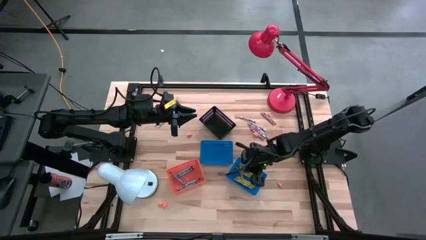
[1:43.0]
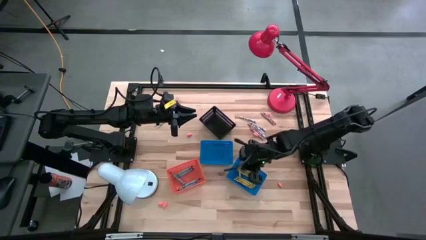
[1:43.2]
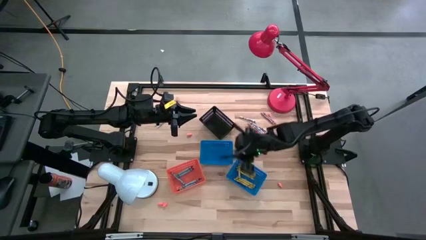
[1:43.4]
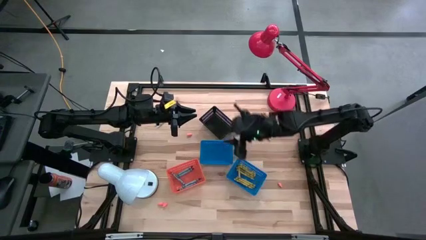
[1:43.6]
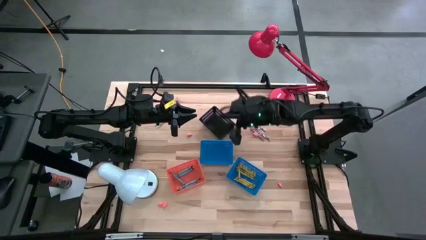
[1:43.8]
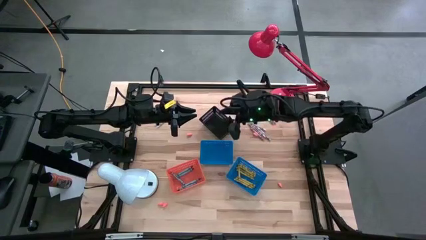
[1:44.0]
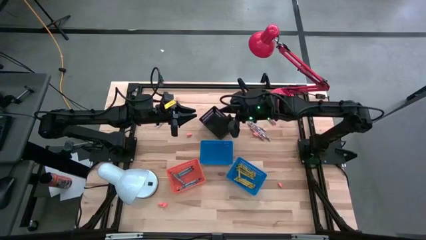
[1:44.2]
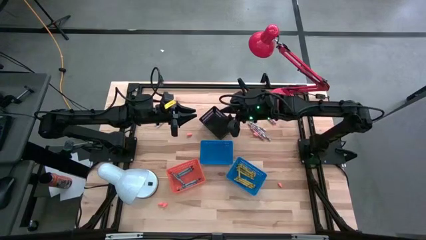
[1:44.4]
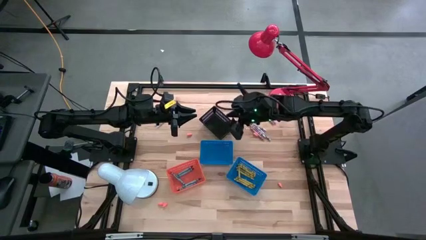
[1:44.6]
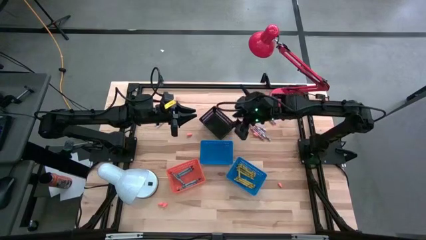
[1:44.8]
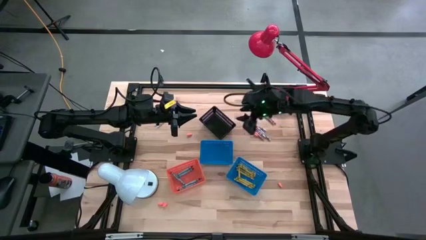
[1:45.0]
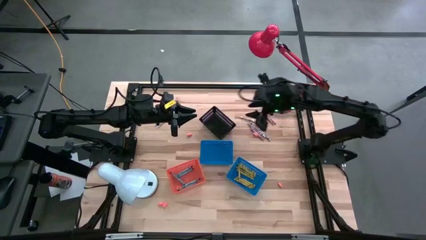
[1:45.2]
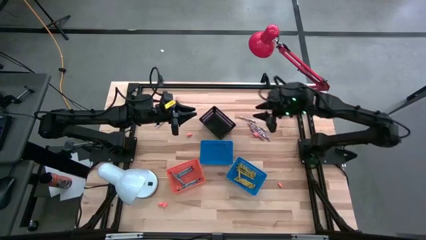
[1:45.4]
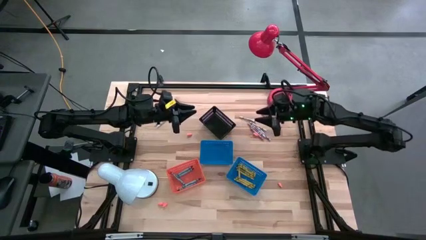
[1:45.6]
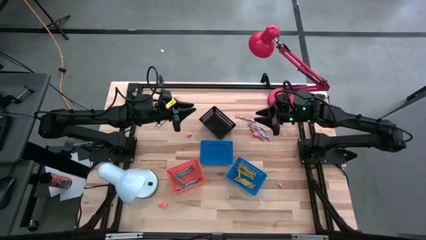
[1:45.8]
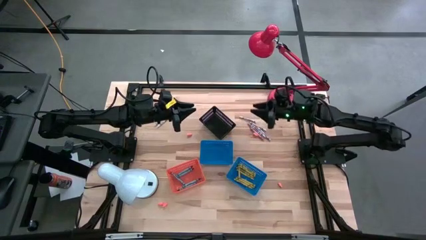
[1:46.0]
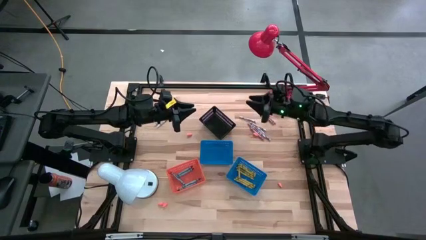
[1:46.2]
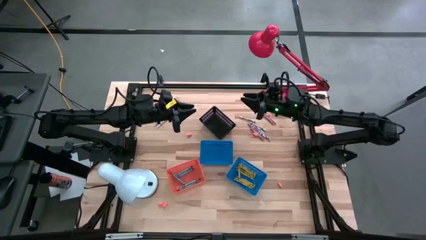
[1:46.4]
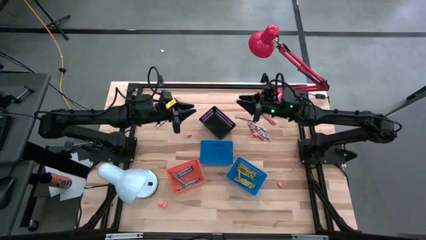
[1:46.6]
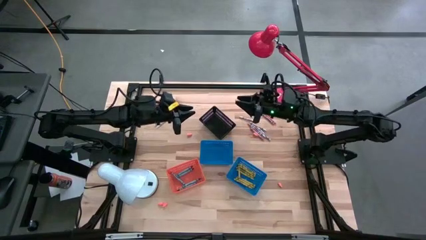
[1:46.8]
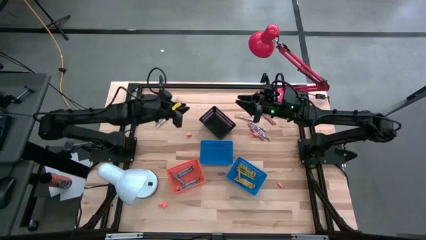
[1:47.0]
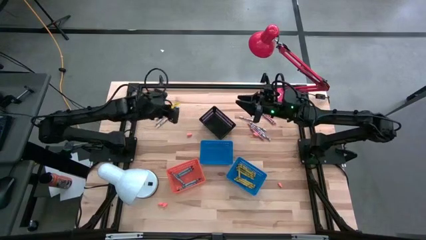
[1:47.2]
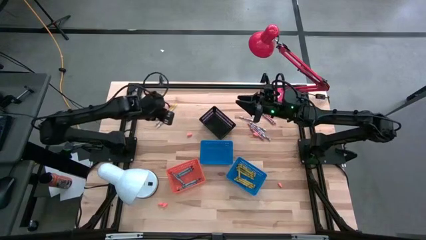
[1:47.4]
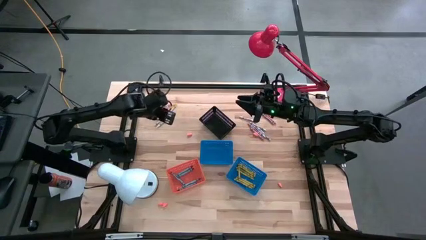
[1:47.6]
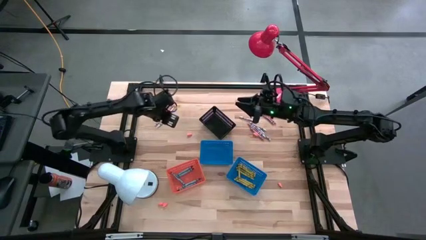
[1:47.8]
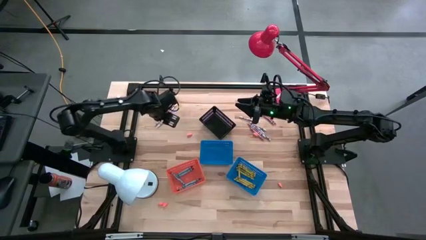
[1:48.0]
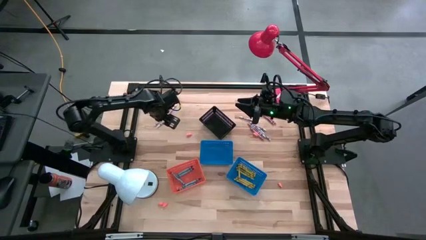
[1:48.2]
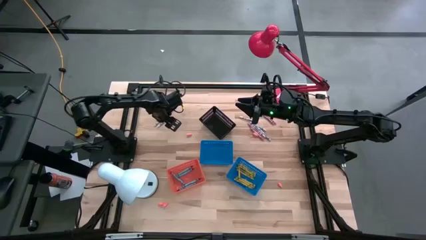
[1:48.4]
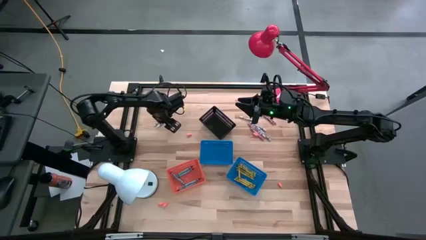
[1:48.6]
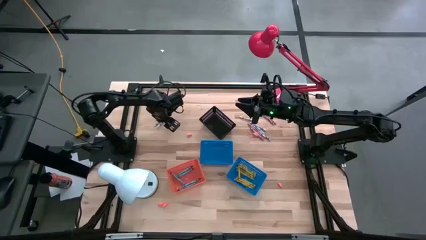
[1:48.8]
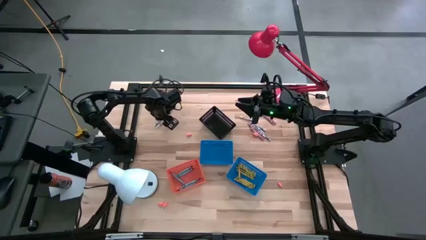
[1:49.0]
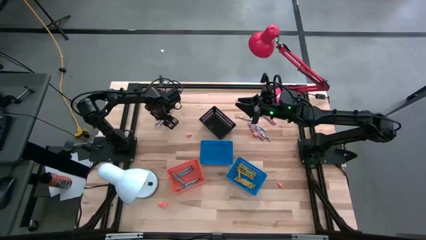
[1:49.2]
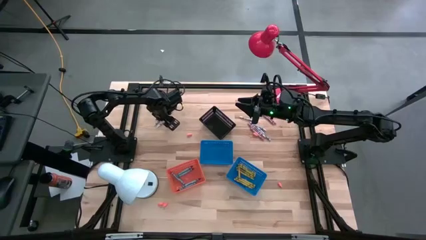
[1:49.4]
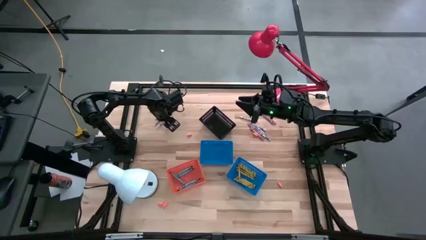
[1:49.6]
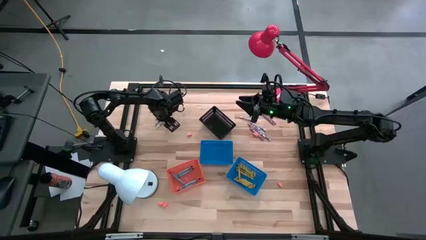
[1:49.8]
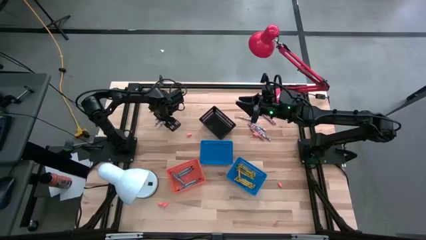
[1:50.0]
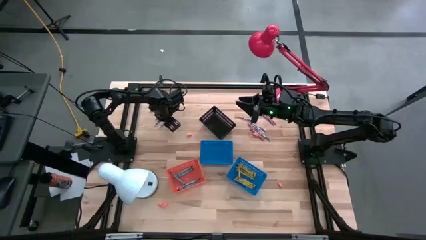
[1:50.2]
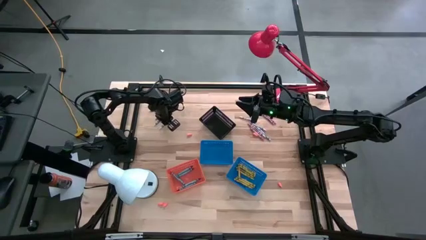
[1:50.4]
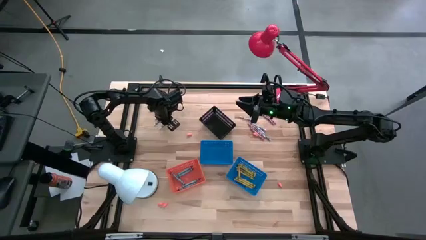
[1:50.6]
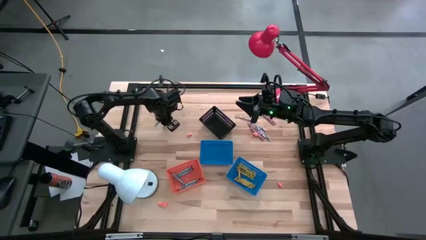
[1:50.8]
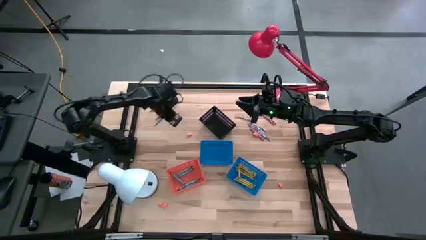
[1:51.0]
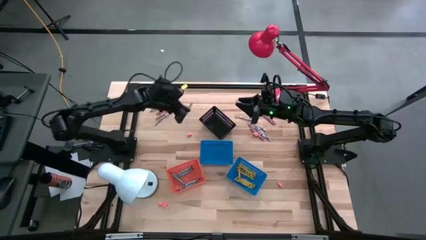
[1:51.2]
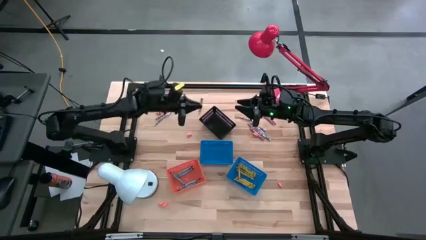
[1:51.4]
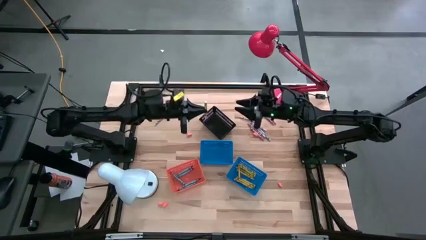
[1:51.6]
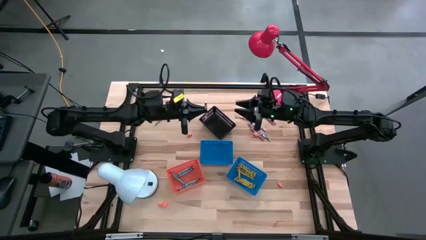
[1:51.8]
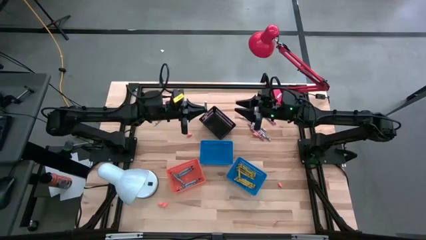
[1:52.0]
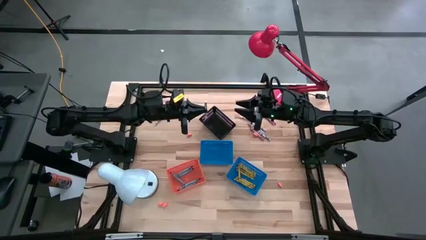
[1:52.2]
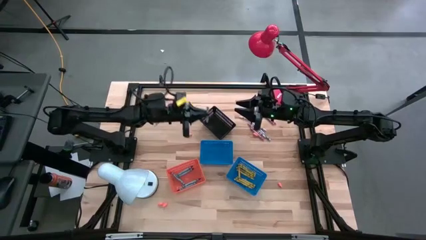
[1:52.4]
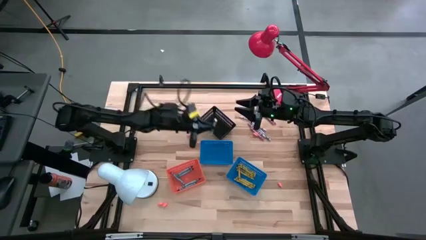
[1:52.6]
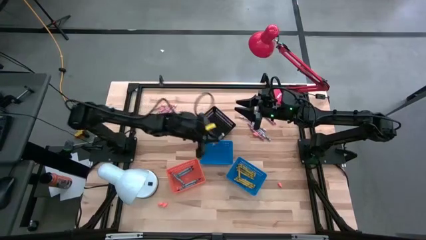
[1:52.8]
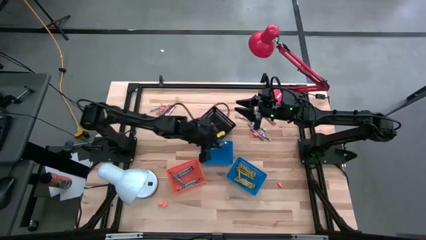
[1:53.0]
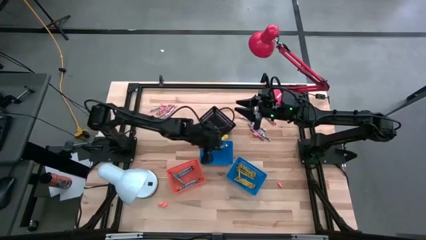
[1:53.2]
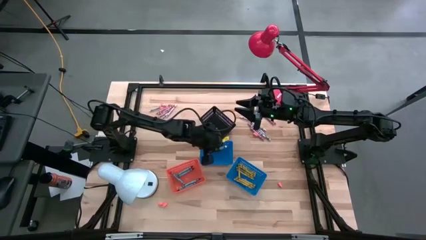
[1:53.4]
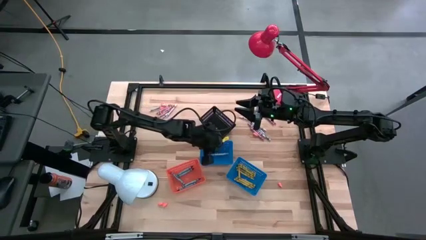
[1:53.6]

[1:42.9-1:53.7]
Task: Sort crayons
Put the white crayon into the left blue bin

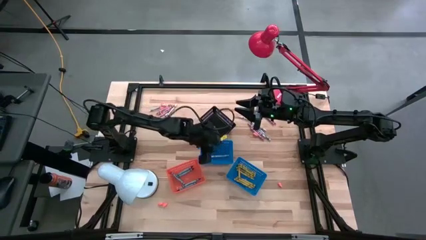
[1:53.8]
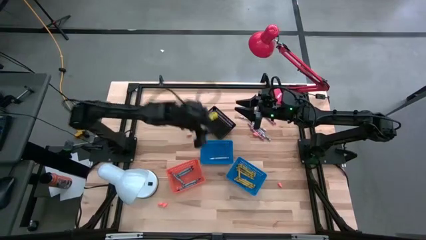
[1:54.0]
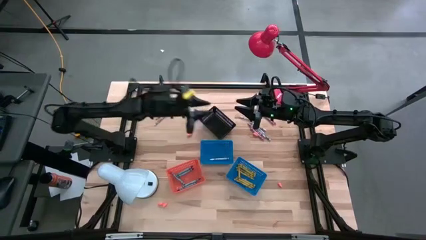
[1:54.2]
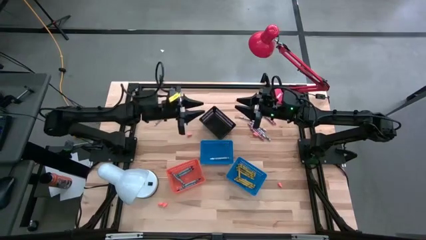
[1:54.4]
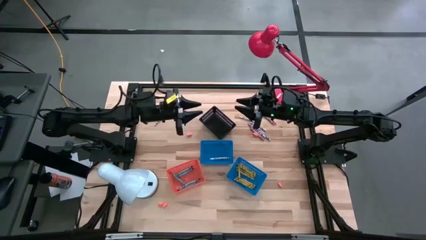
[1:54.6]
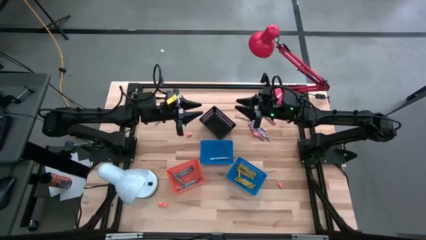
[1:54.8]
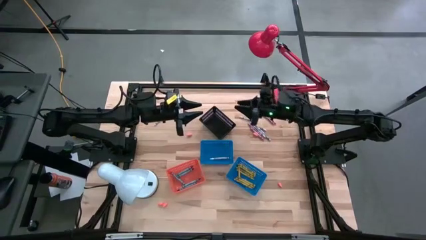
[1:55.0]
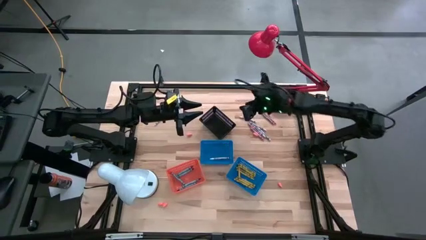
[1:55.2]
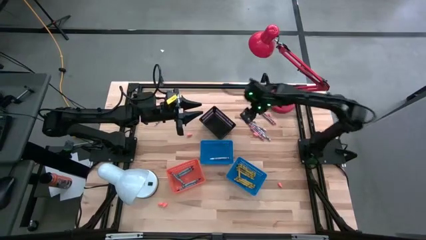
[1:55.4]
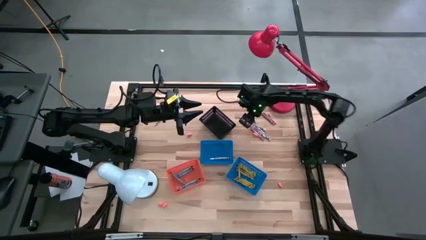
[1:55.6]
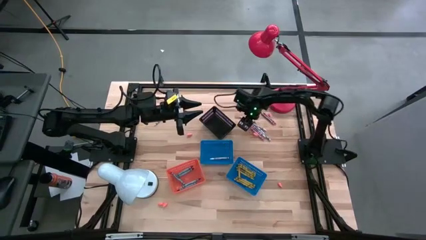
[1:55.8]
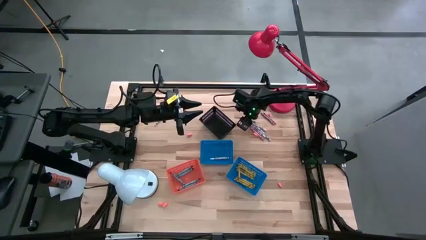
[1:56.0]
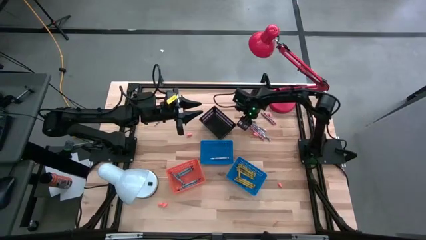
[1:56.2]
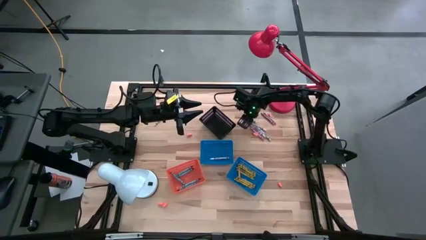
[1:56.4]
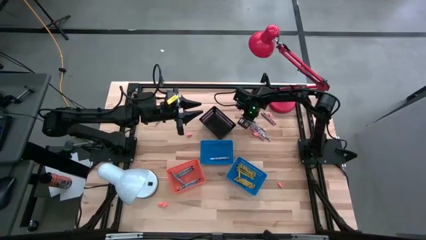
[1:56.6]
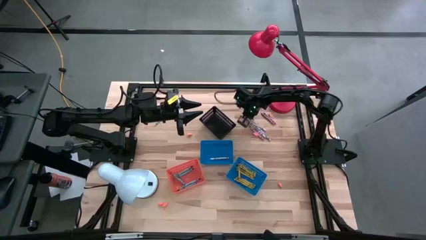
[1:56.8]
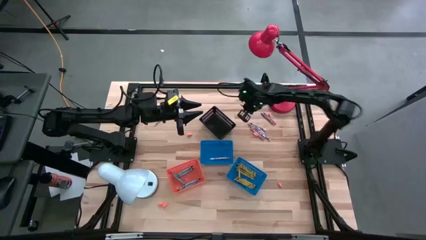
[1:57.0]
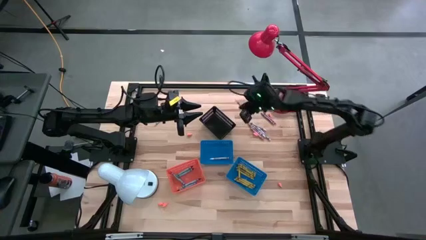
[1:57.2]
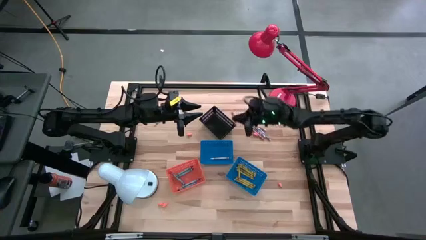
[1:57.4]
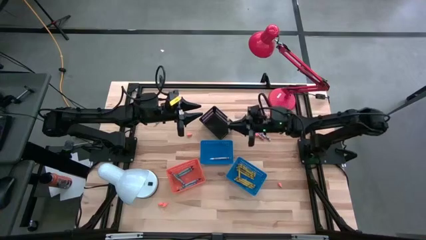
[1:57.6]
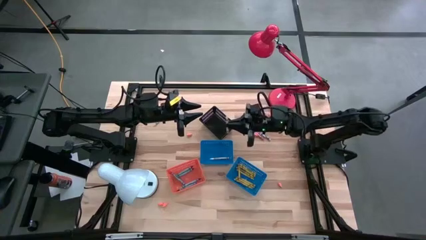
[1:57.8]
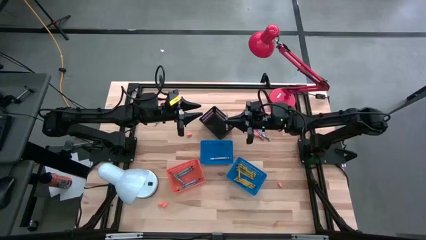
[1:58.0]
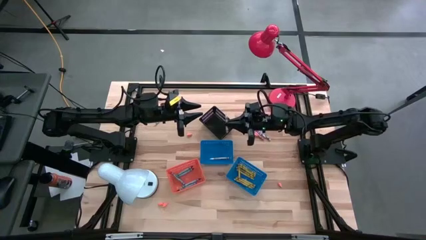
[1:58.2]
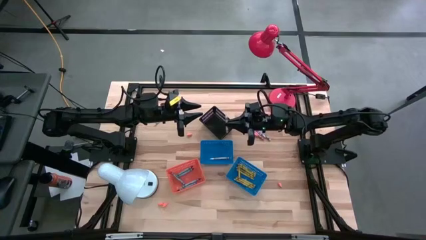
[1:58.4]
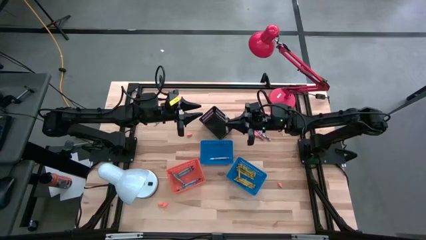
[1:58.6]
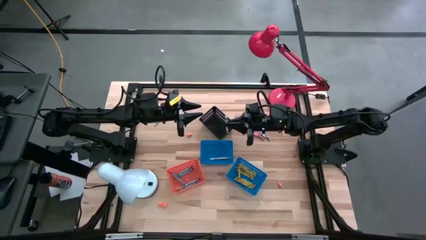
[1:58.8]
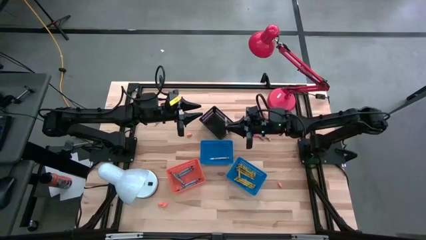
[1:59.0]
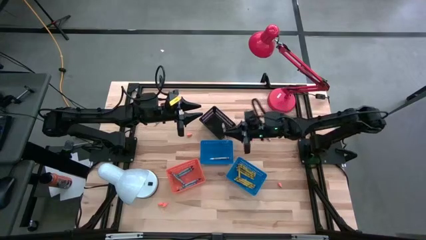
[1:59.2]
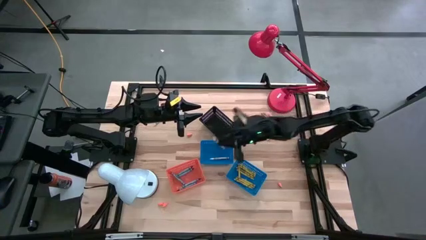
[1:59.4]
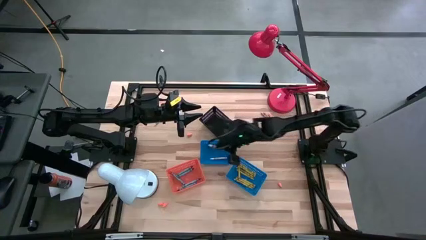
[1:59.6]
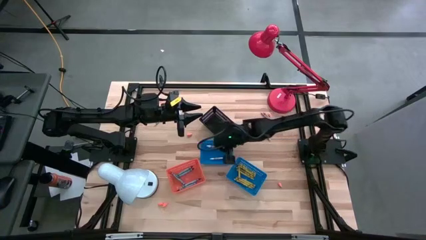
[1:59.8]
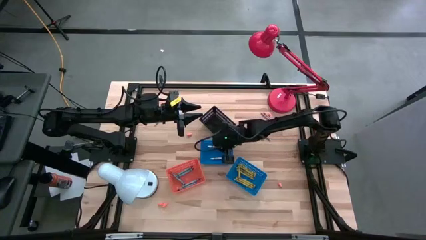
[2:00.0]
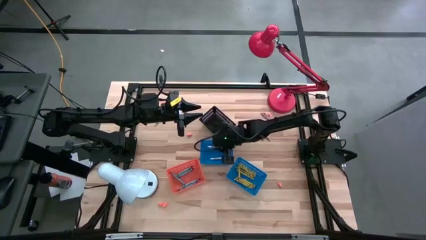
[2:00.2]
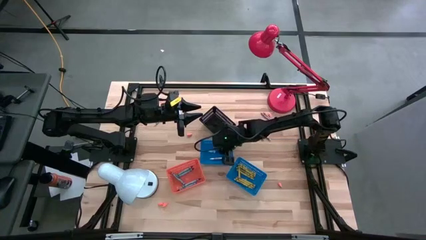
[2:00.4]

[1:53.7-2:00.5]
Put the white crayon into the left blue bin
